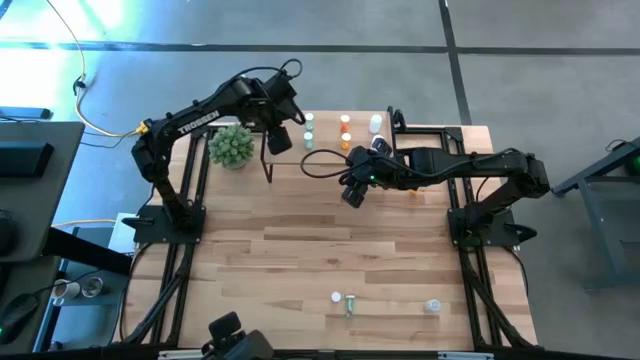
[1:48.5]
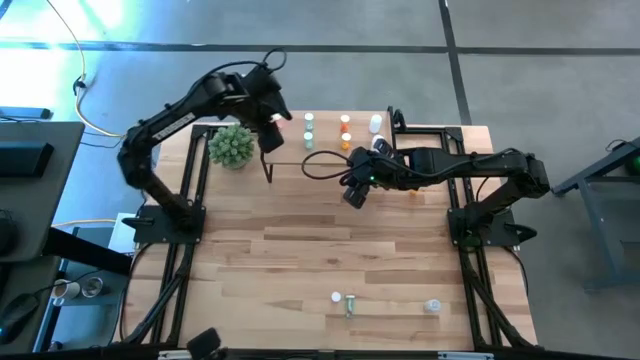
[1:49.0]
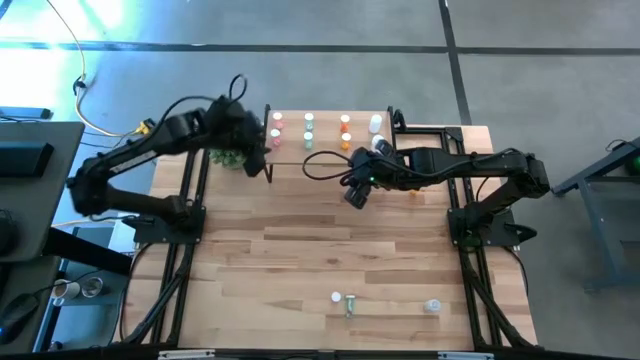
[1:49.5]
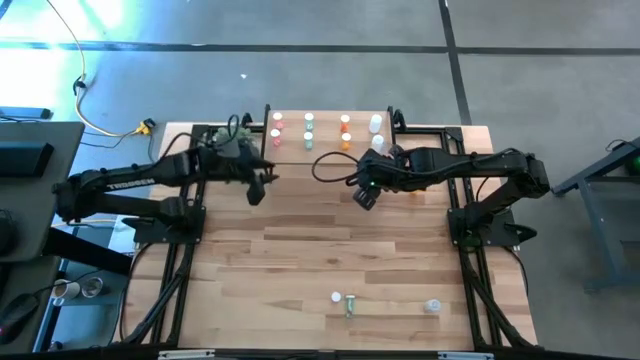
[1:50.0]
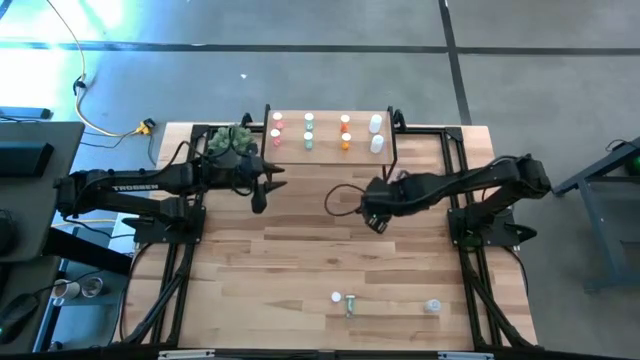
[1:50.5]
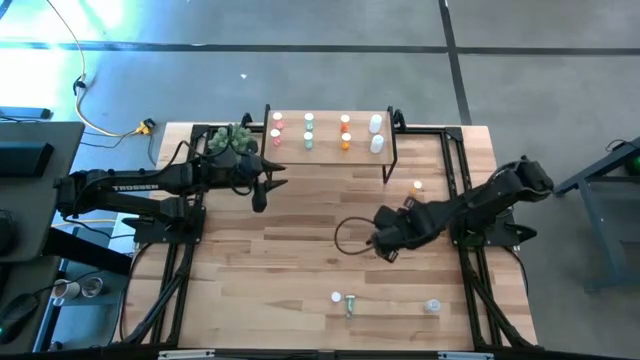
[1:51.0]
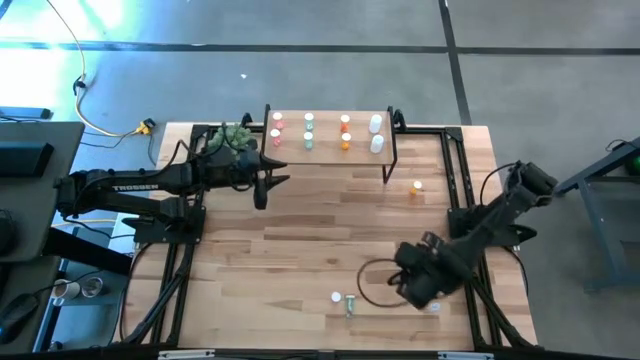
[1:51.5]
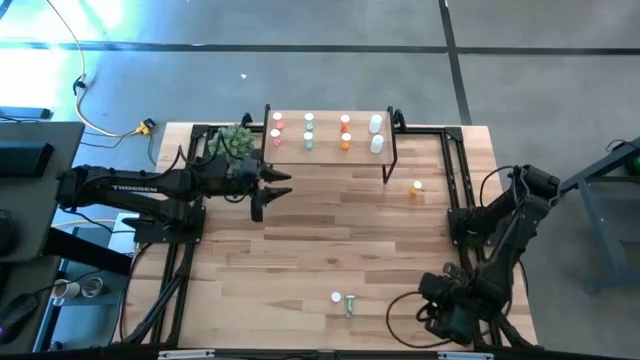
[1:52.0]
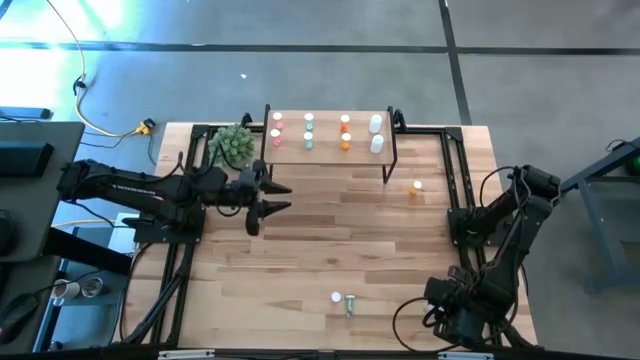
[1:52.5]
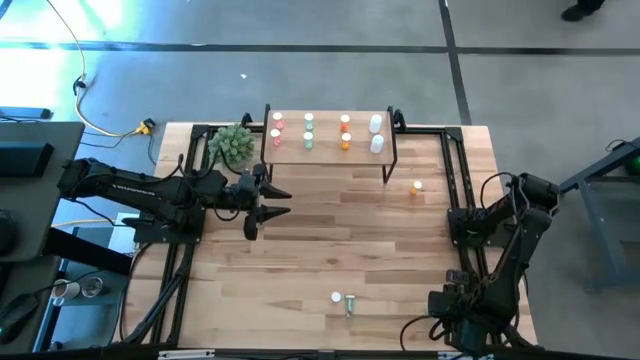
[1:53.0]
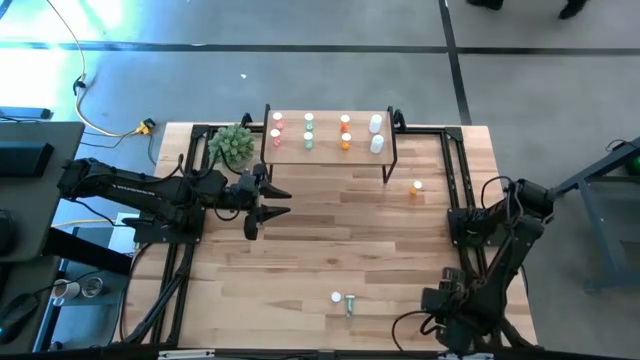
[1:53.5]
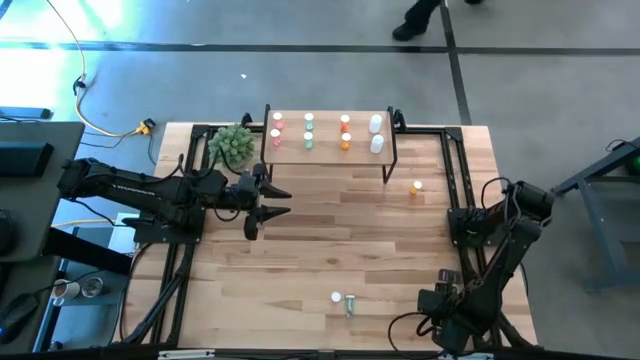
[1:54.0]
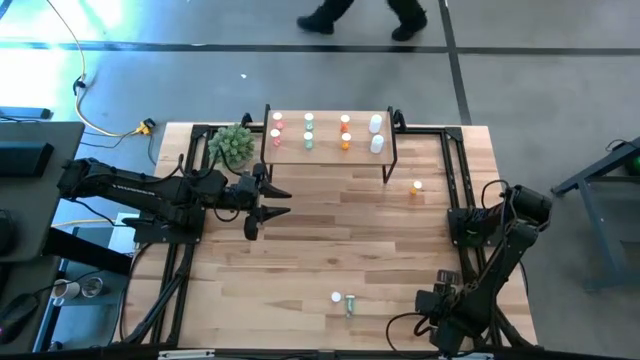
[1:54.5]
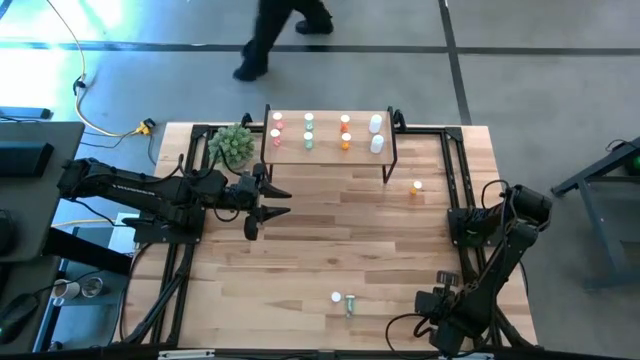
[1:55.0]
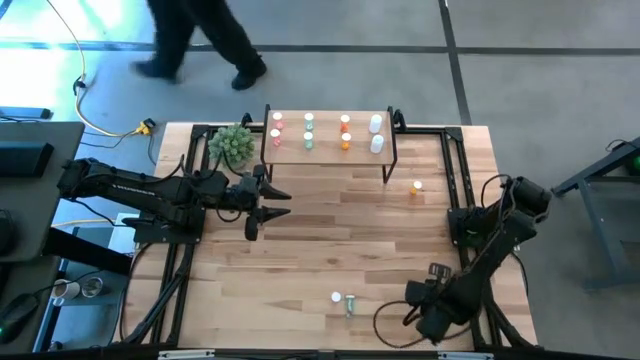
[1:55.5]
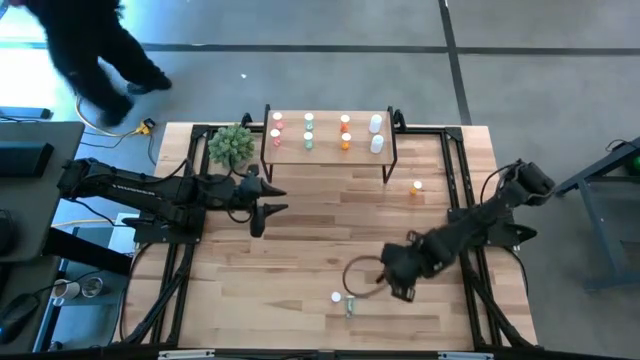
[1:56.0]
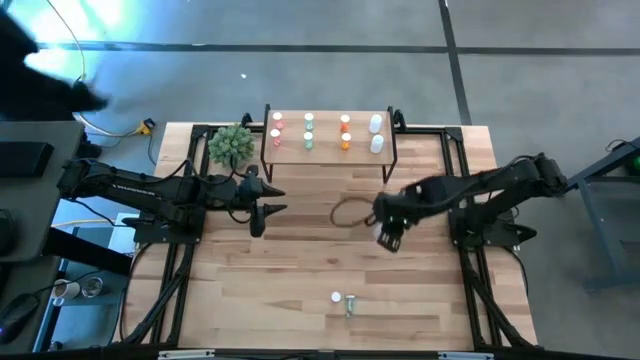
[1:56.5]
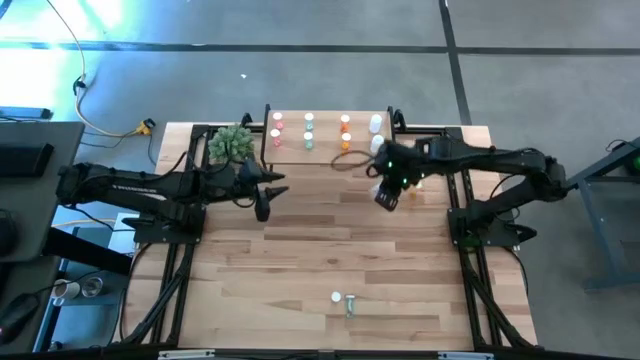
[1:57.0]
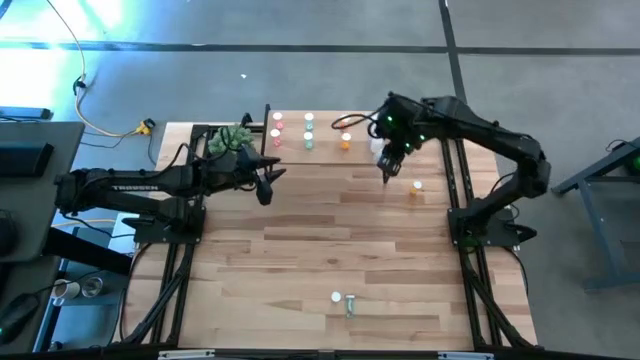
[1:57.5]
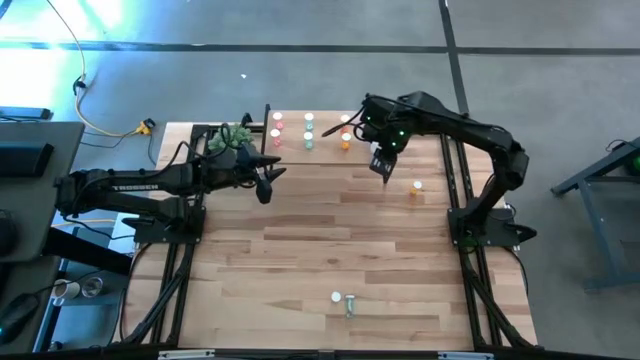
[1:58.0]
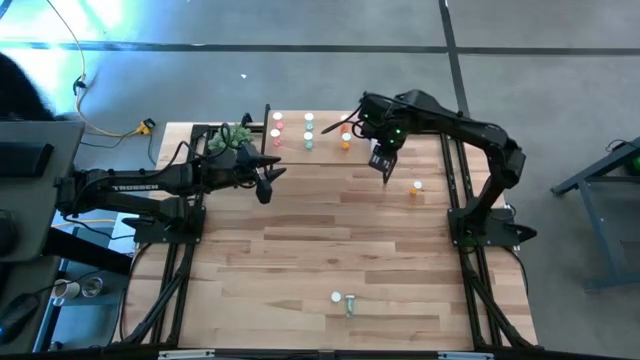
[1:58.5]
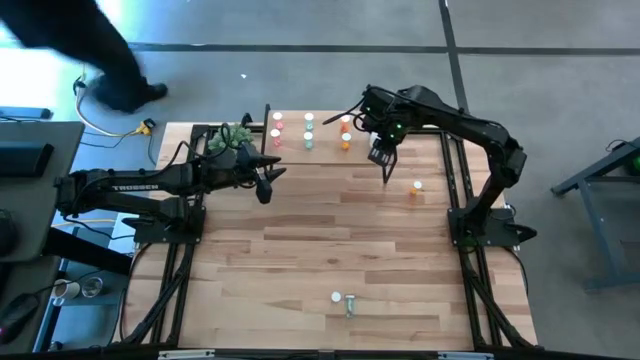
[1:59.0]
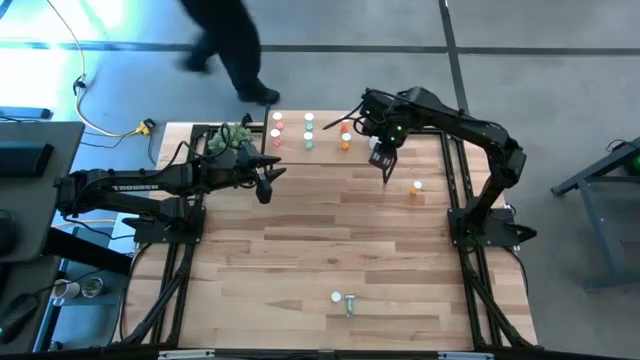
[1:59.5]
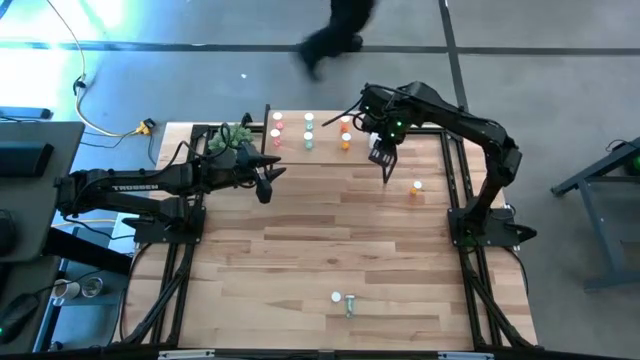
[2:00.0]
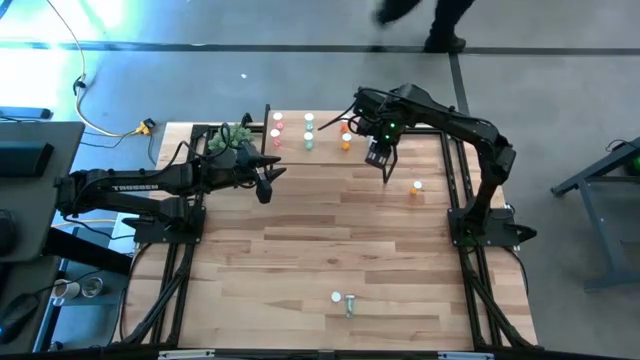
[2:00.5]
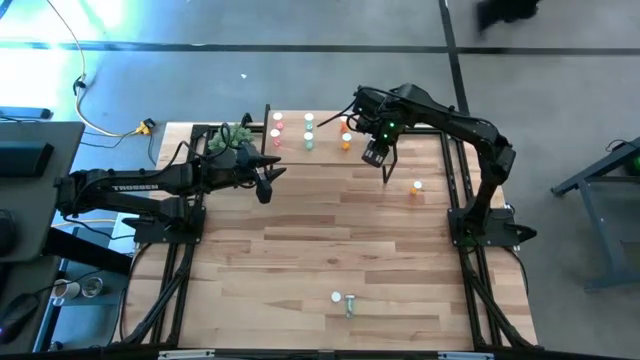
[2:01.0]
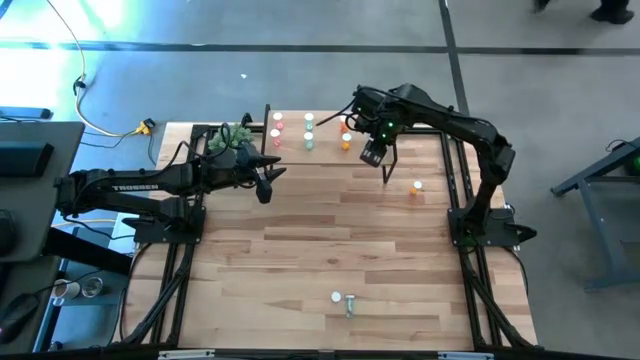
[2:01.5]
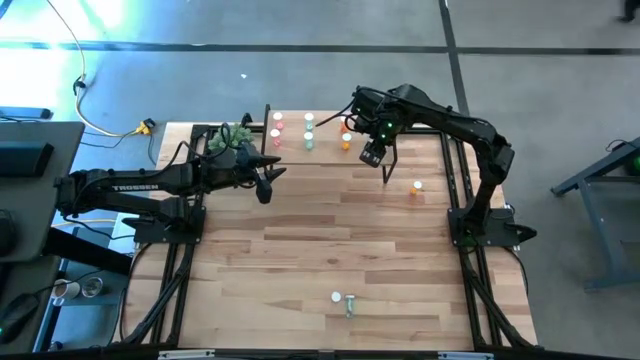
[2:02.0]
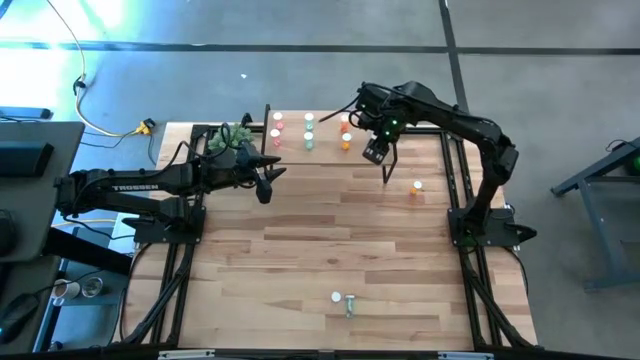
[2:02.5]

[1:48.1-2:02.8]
Task: Pick and place medicine bottles onto shelf by color
Put the white pill bottle on the shelf aligned with the other white pill bottles

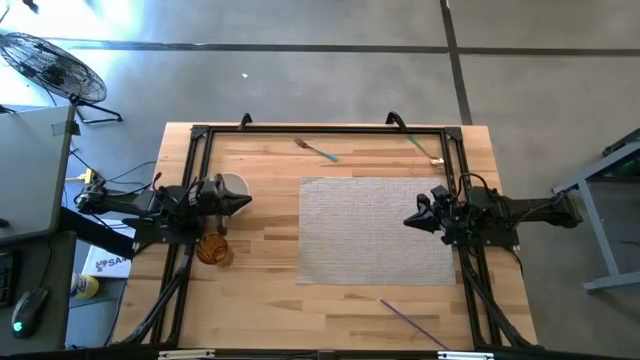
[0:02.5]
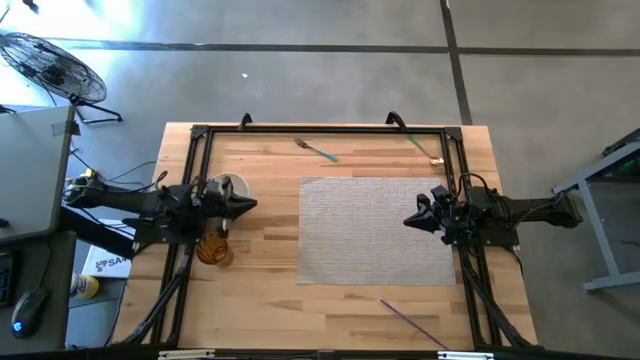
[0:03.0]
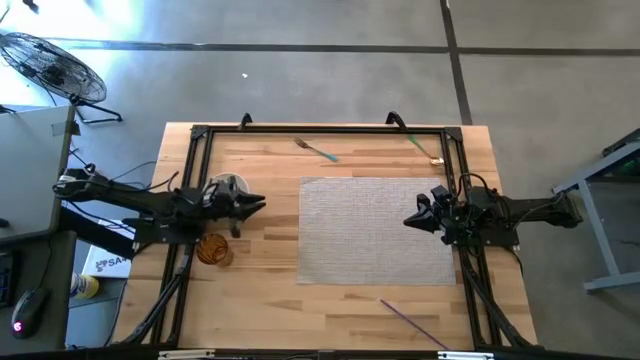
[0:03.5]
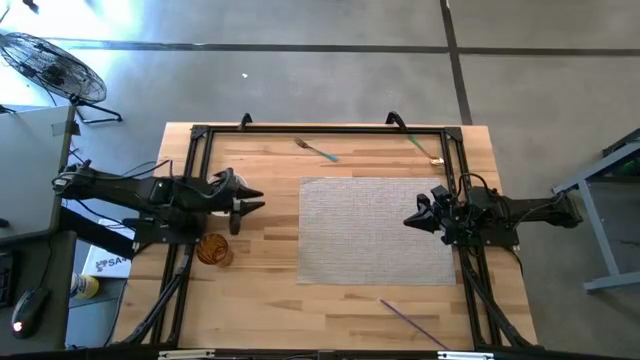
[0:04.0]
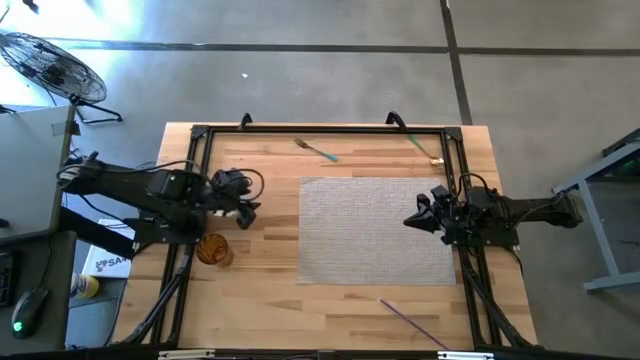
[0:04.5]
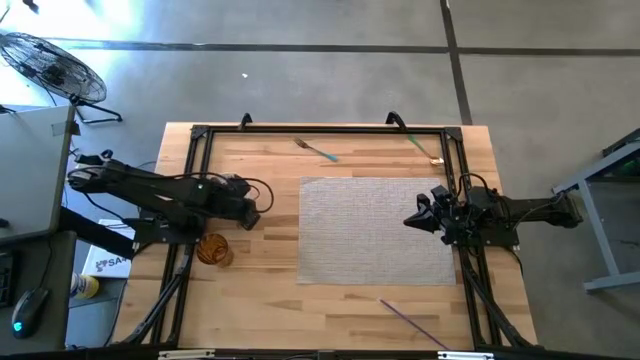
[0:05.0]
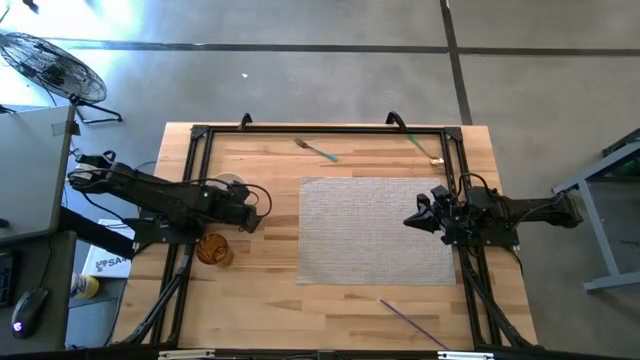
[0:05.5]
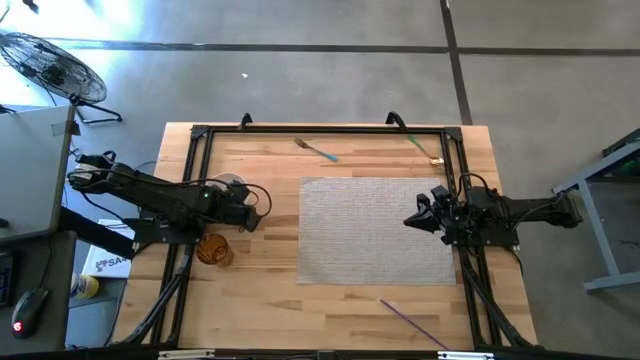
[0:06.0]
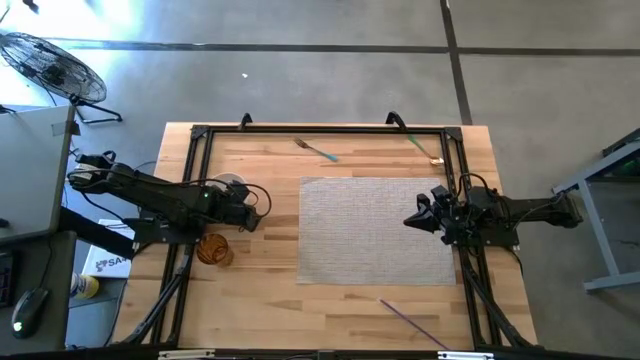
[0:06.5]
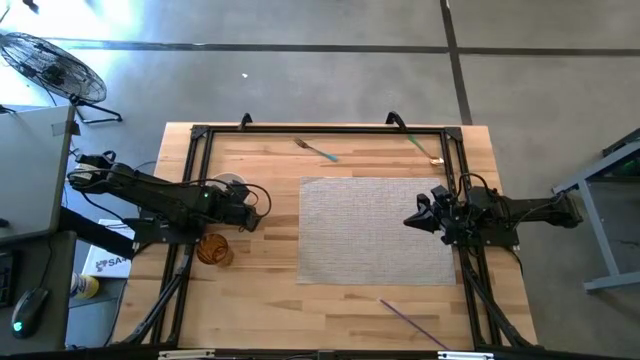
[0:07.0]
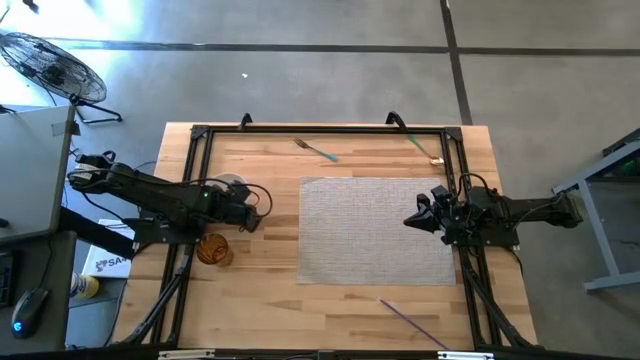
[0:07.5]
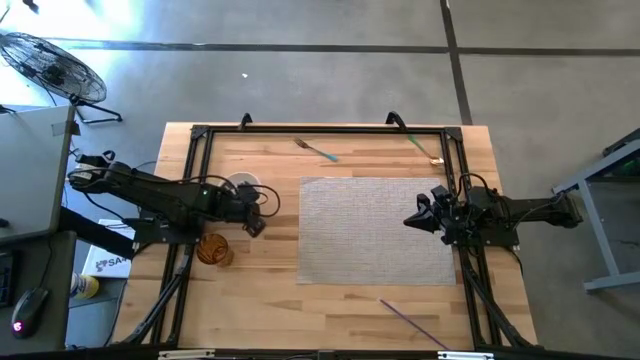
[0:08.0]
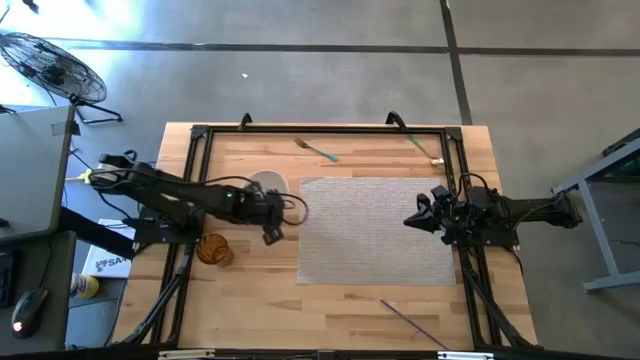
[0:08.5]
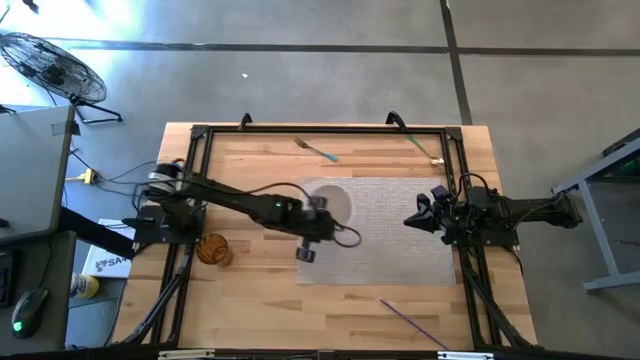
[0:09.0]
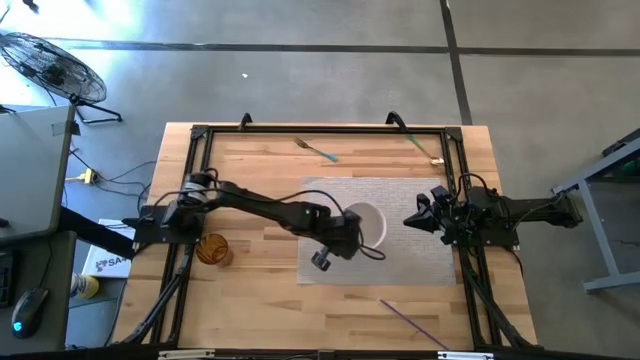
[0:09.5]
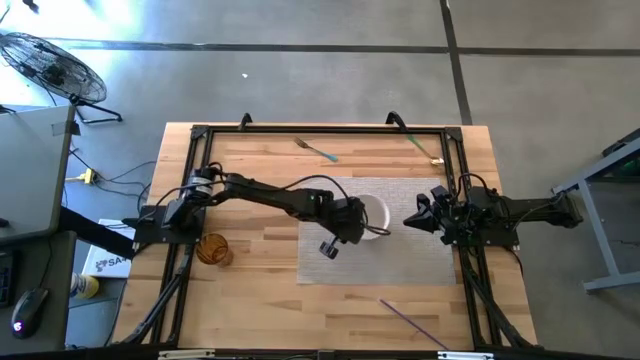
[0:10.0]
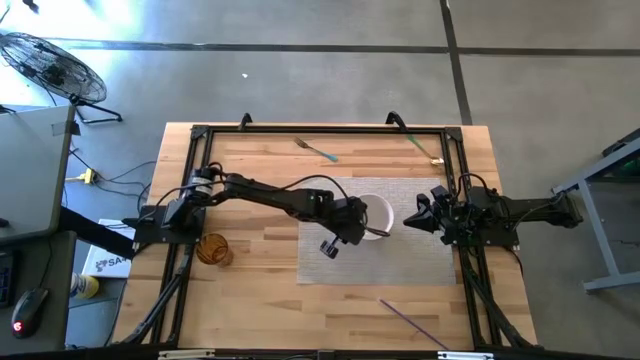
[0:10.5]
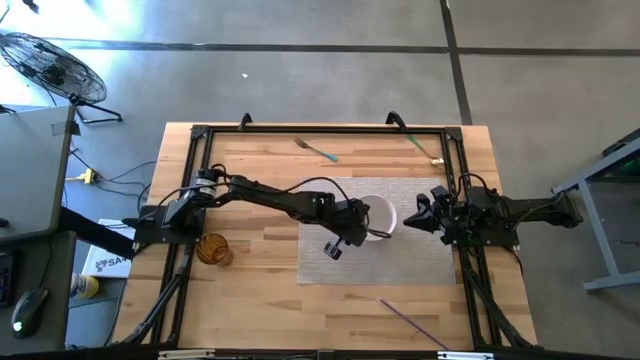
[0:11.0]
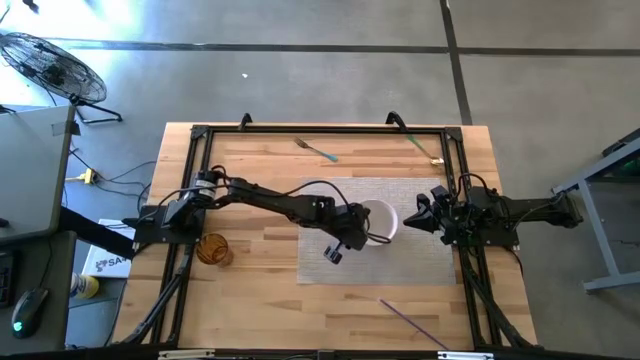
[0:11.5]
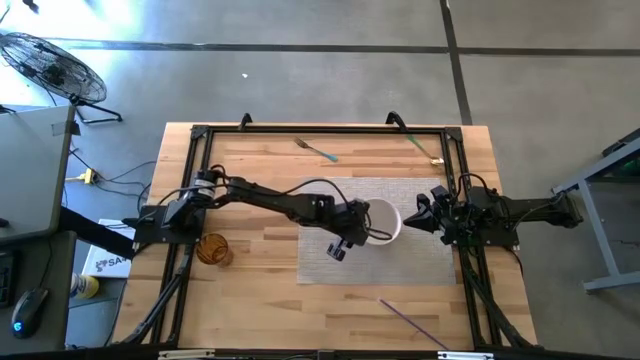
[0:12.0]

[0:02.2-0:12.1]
Task: Pick & Place Utensil
Put the white bowl on the gray mat
